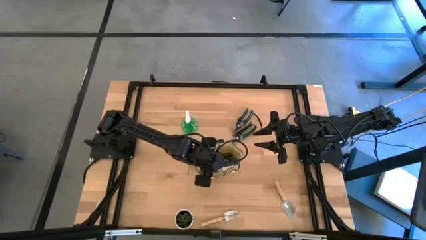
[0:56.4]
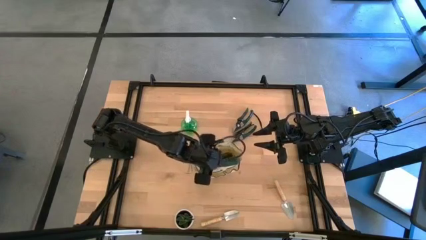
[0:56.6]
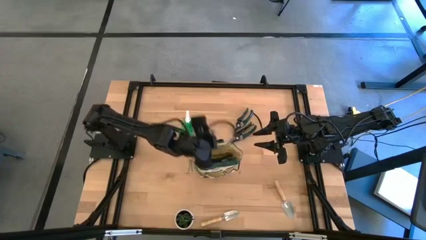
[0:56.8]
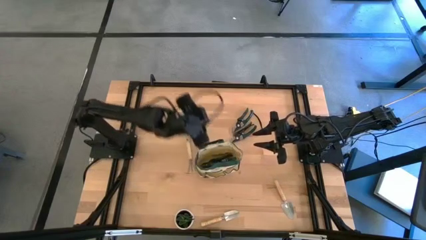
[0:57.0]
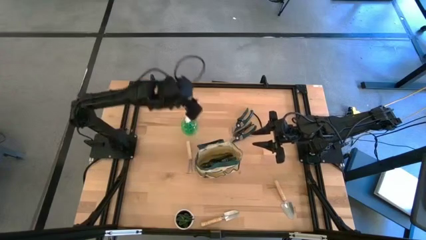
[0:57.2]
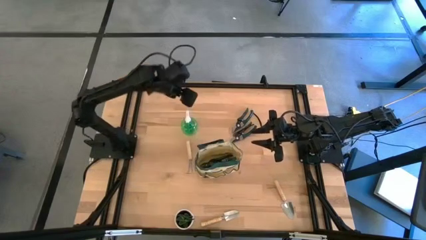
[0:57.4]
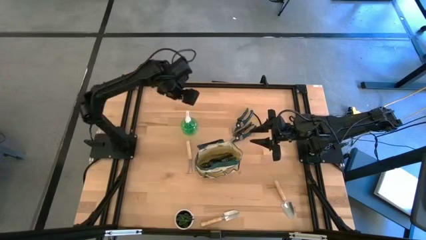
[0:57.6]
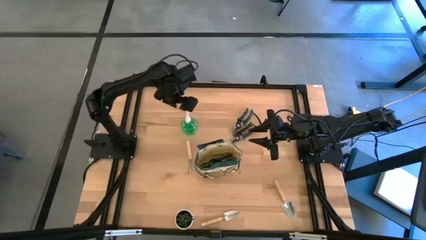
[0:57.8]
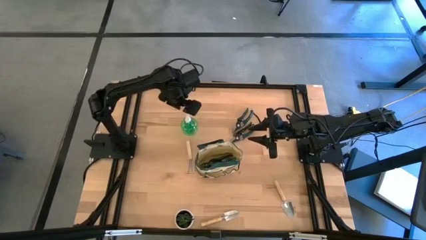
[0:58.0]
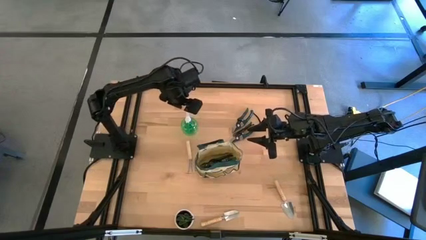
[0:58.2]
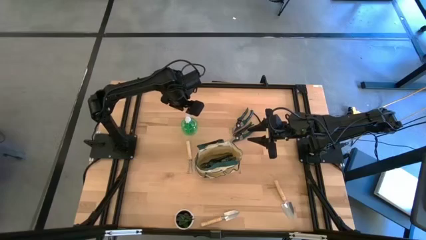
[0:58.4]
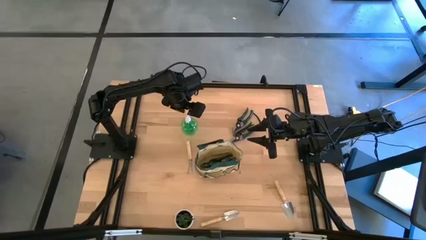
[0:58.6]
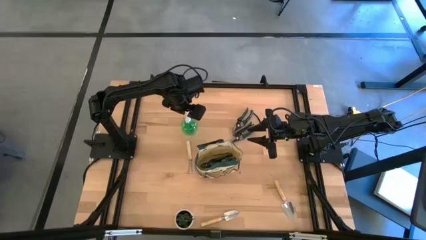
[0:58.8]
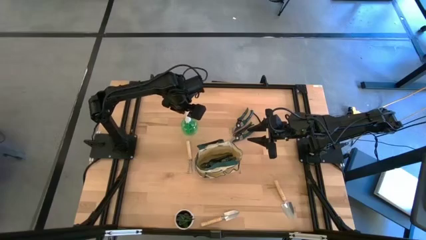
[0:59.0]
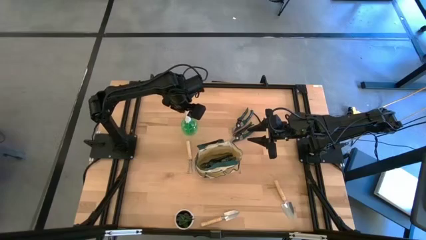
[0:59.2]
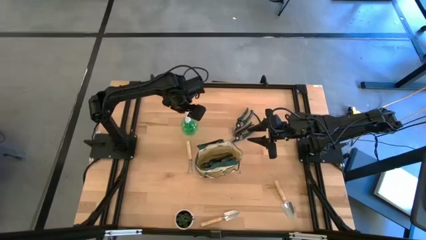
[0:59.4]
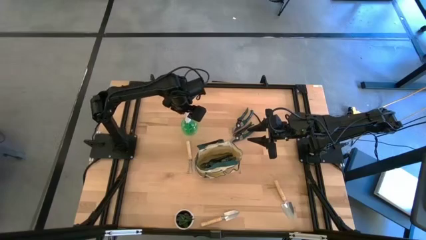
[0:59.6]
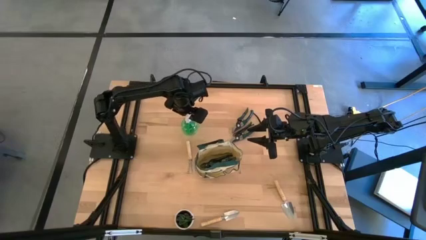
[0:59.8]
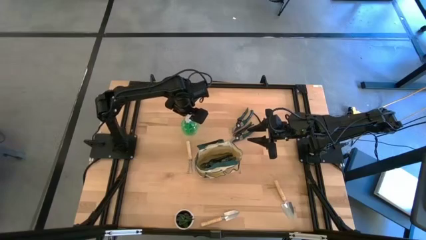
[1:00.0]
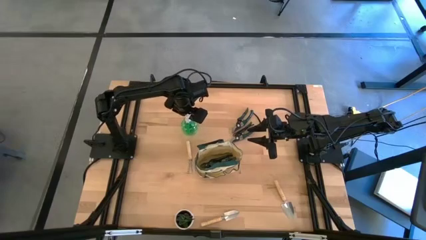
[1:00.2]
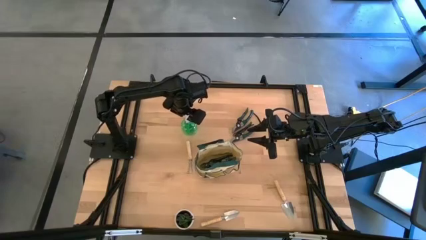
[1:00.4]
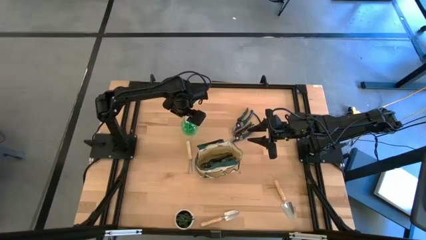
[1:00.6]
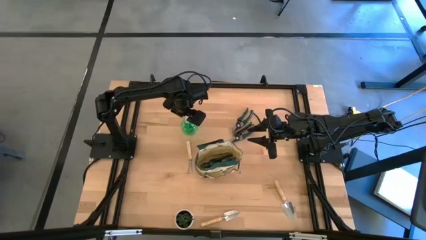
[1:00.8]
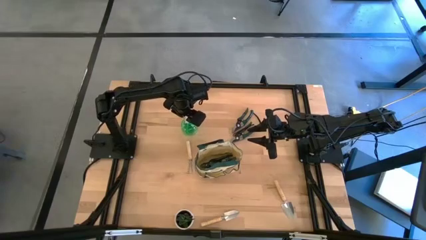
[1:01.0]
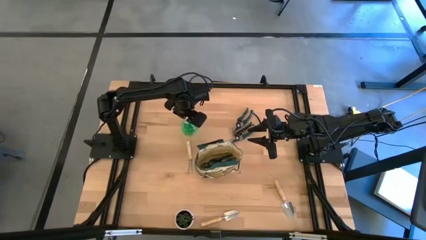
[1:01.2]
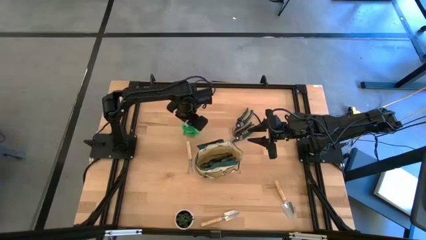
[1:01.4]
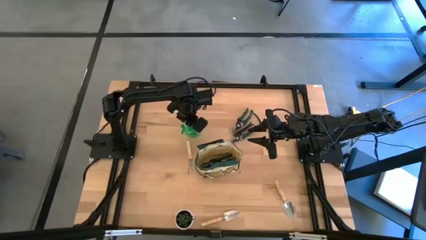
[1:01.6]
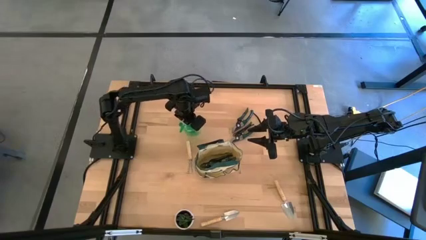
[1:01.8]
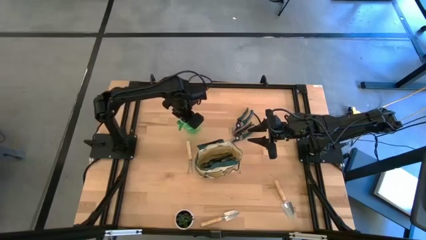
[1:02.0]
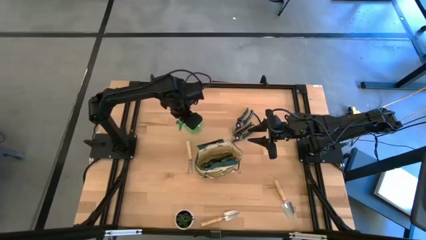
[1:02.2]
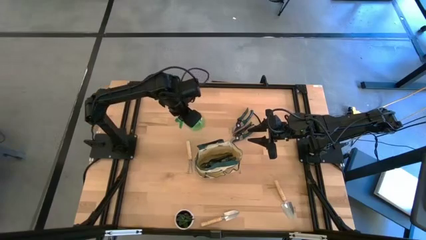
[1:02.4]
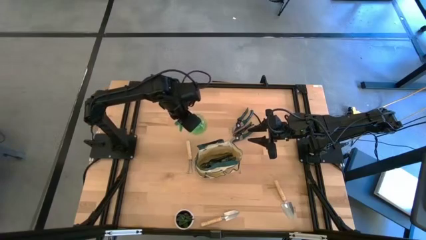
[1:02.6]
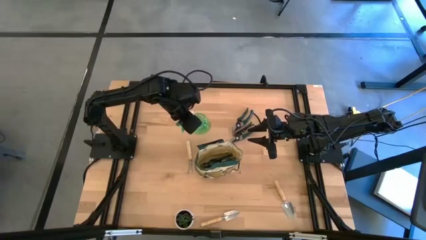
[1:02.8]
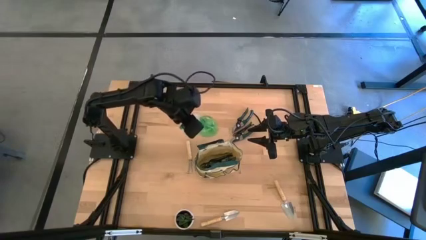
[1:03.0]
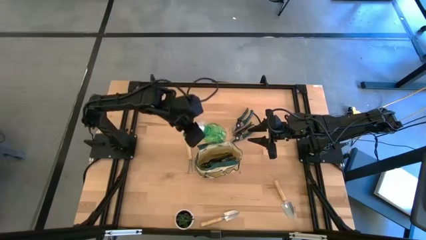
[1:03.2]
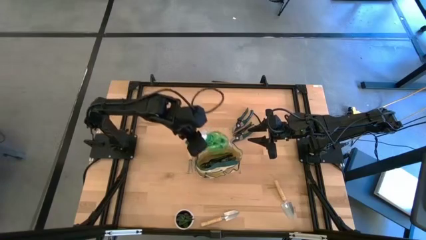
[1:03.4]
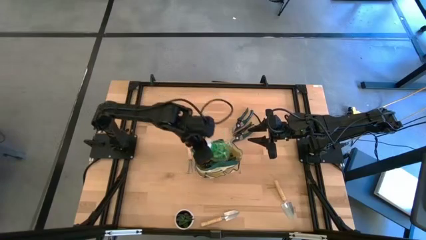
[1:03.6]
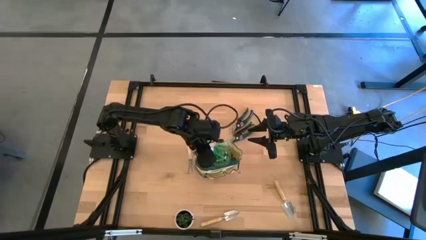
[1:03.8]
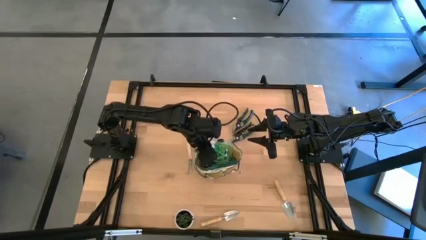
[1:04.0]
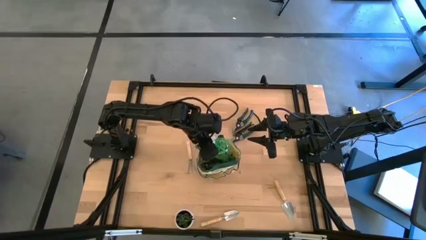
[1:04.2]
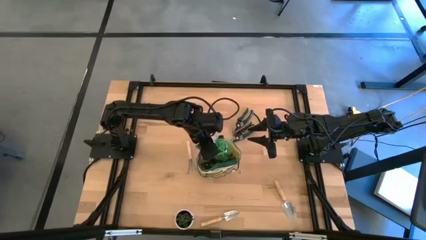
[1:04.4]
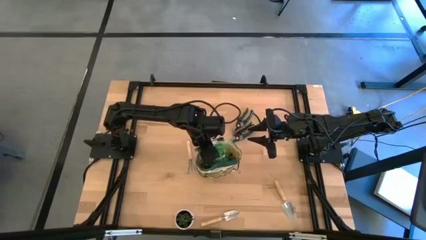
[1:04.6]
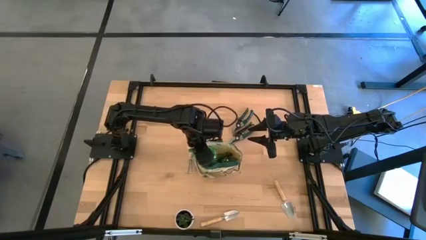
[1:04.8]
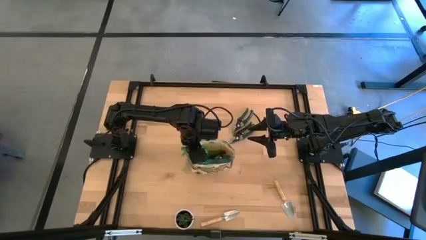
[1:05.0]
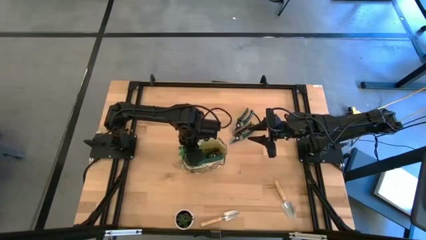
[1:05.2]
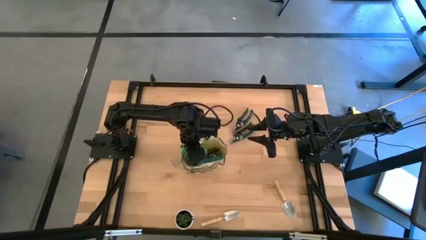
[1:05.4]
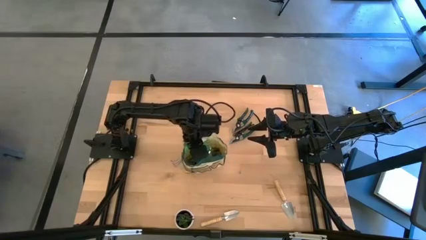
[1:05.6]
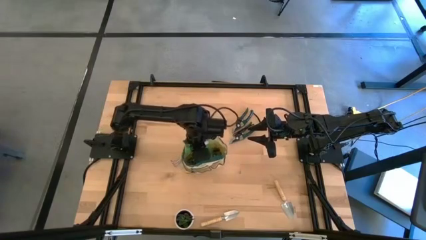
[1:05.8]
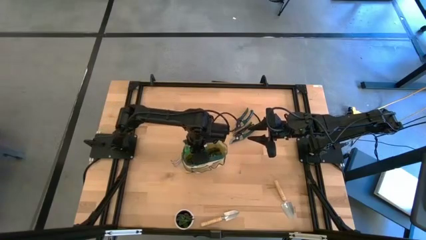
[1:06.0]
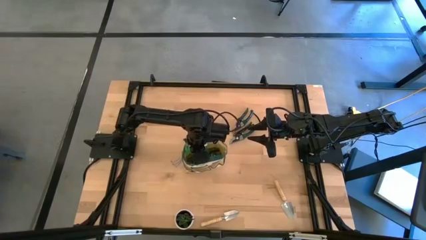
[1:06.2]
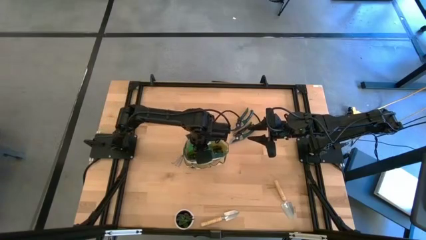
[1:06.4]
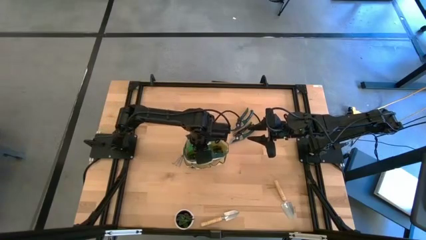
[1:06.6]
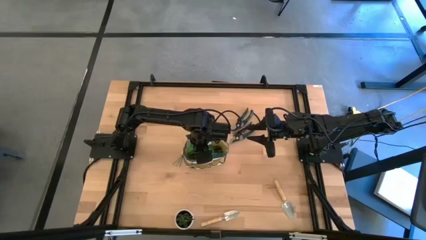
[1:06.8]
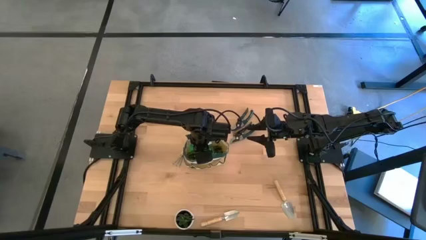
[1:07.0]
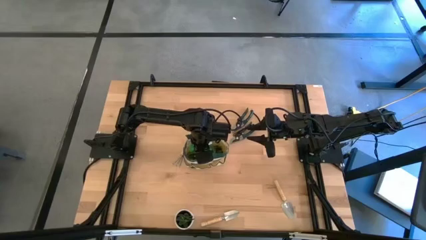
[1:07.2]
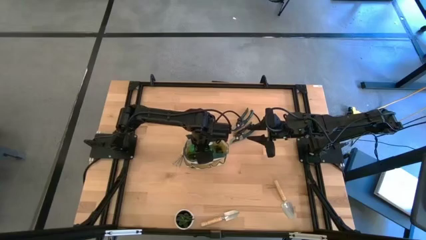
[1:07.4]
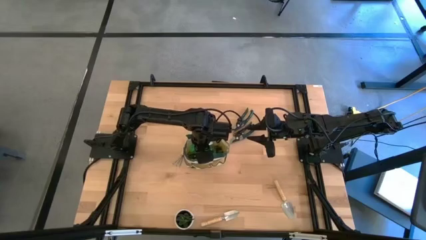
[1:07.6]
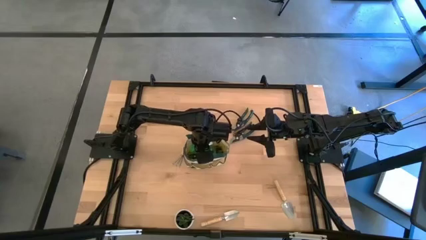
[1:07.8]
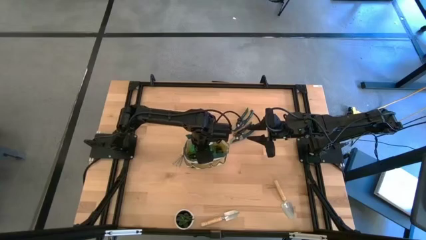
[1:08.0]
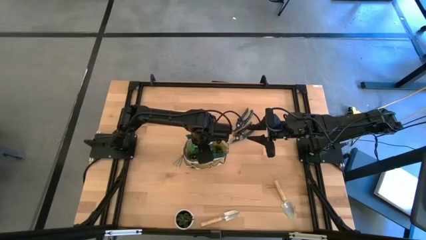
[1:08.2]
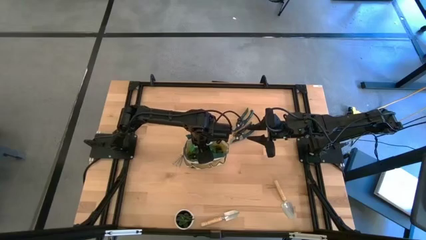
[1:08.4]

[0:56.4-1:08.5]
Task: Pick & Place Garden tools in Gardening bag
Put the green gardening spray bottle into the green gardening bag

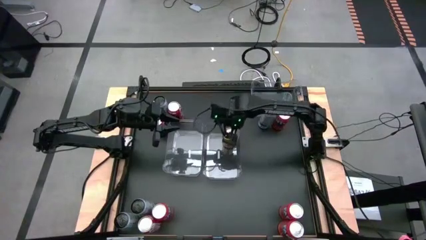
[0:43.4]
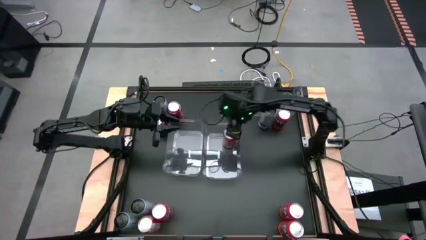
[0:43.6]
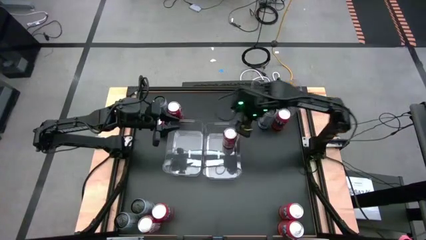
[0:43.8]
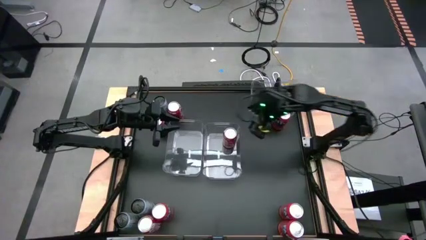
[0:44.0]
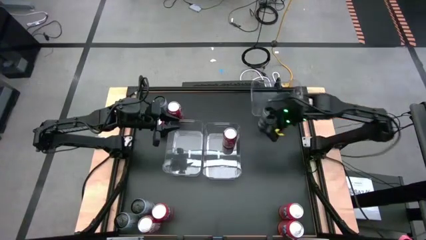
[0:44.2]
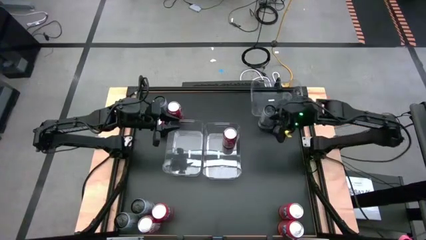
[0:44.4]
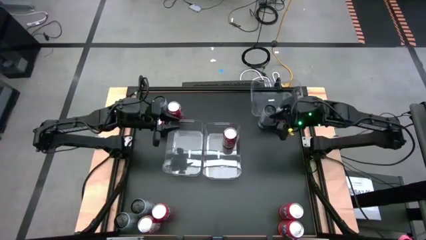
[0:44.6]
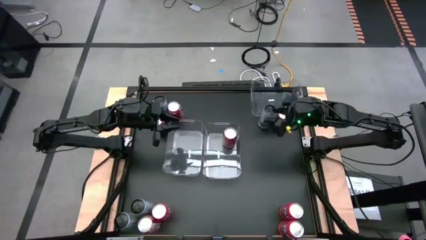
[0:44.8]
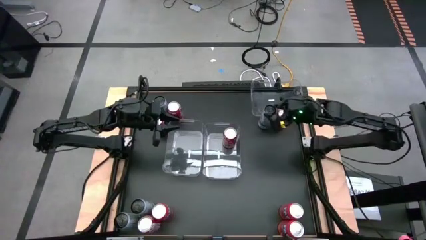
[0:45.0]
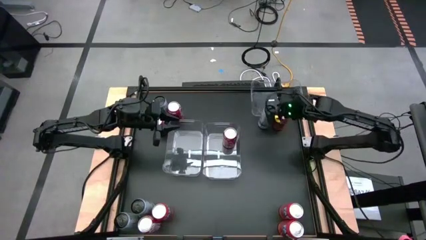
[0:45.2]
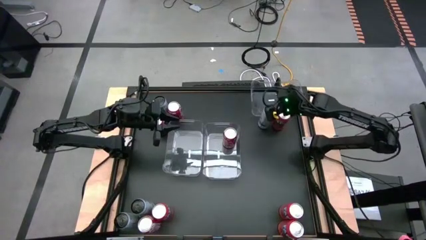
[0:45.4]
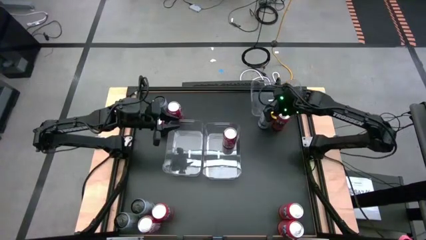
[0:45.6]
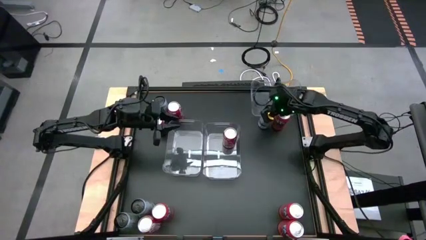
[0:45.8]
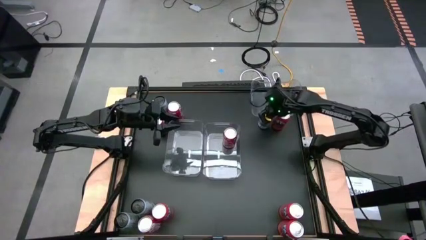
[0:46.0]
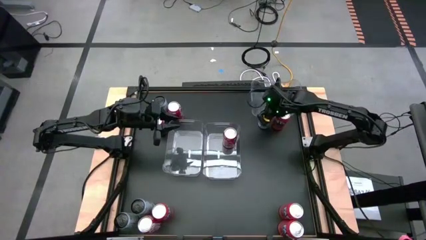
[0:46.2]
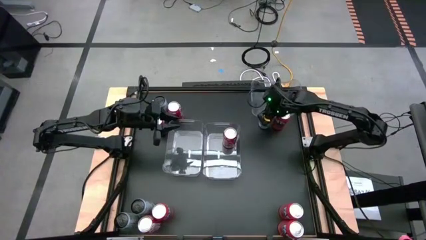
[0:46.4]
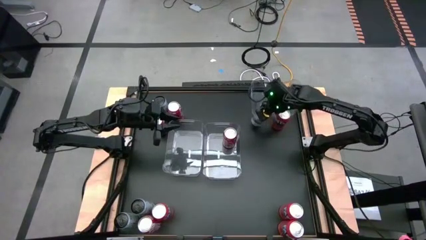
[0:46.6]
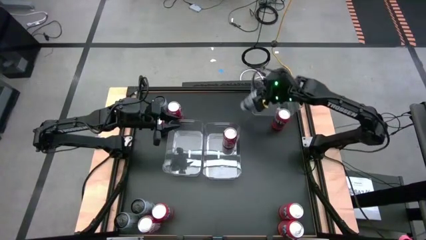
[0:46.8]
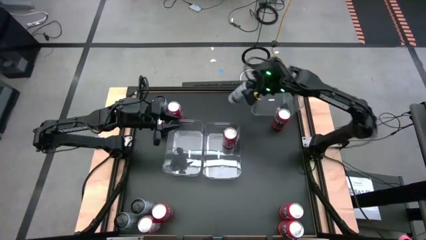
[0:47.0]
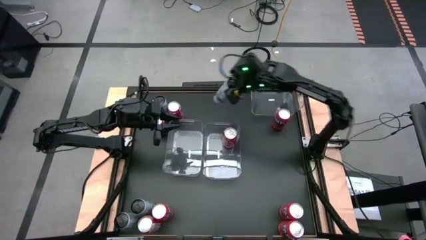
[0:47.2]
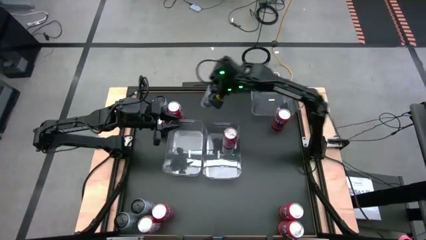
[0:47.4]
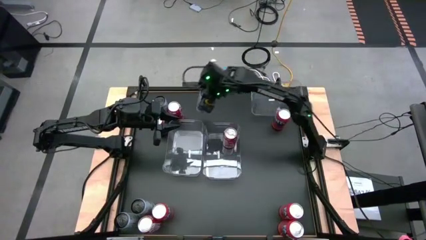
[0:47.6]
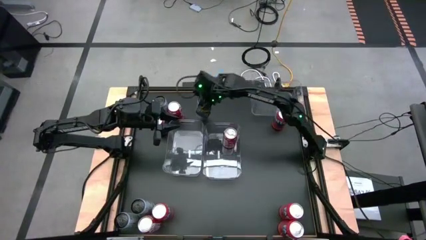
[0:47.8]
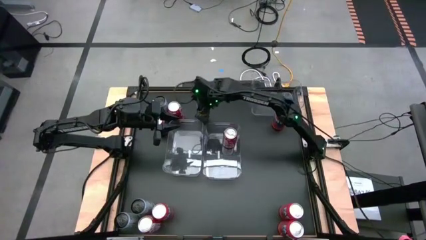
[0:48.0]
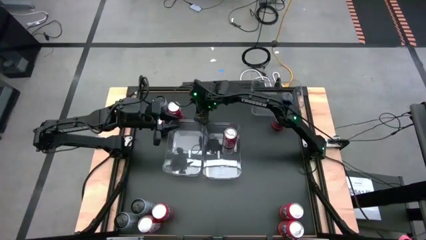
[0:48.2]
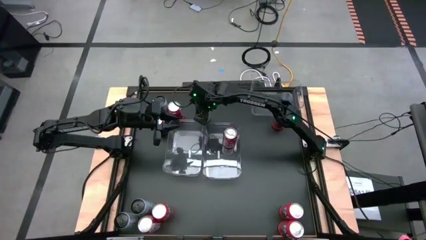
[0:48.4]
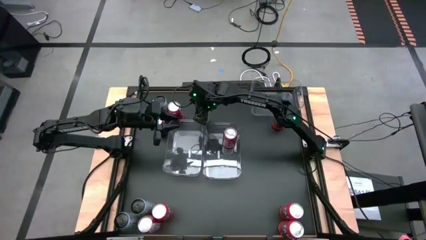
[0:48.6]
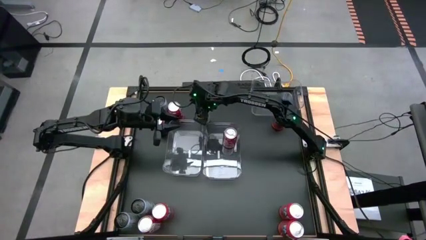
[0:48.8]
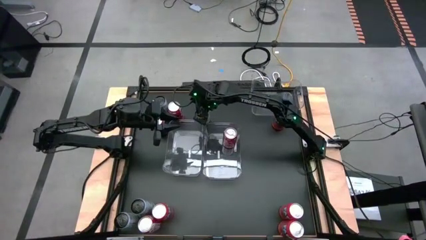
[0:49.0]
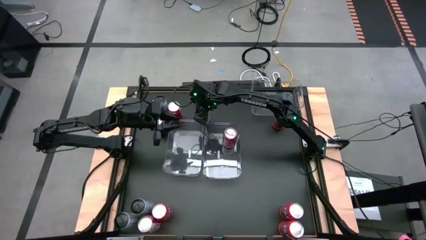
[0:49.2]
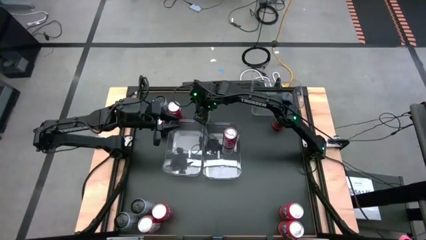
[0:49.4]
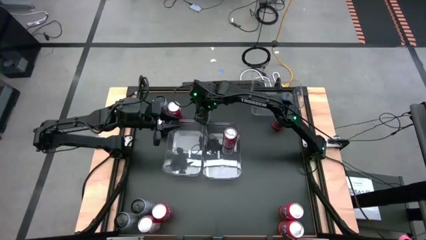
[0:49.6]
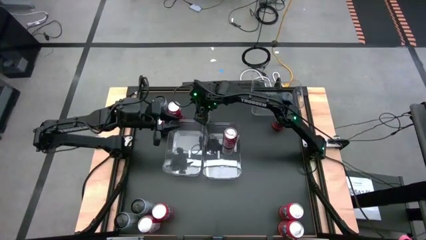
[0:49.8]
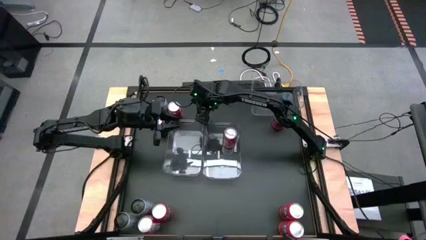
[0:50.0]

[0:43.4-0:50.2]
Task: Sort soda cans
Move the white-blue soda can to the top center of the table
